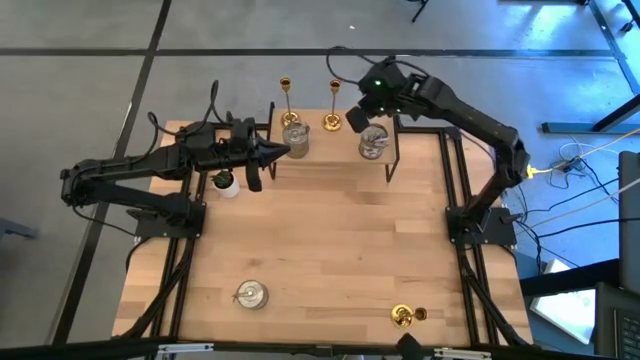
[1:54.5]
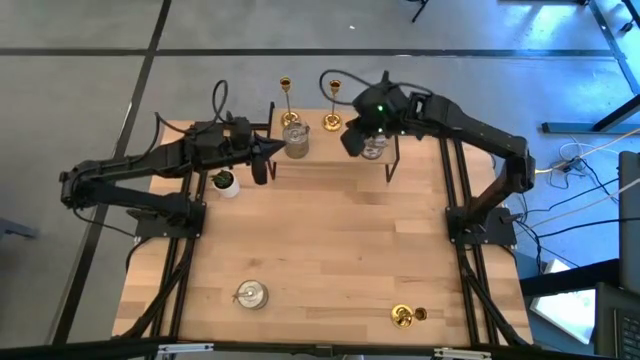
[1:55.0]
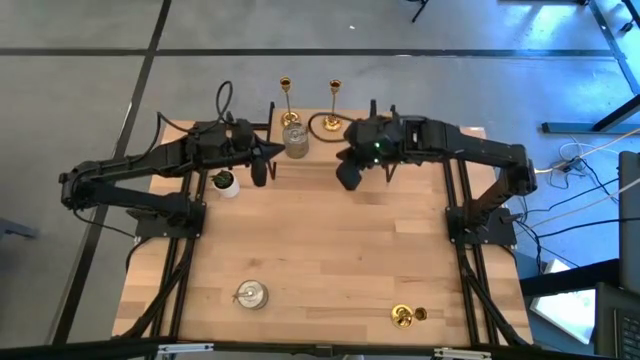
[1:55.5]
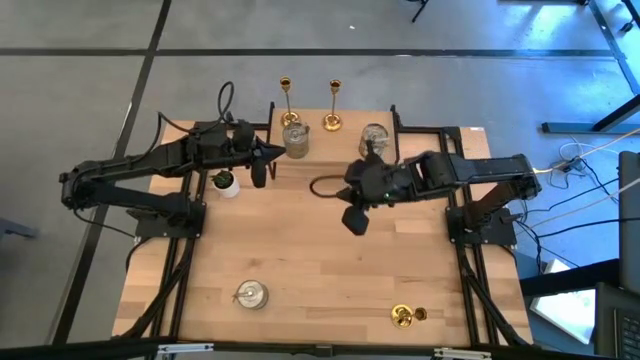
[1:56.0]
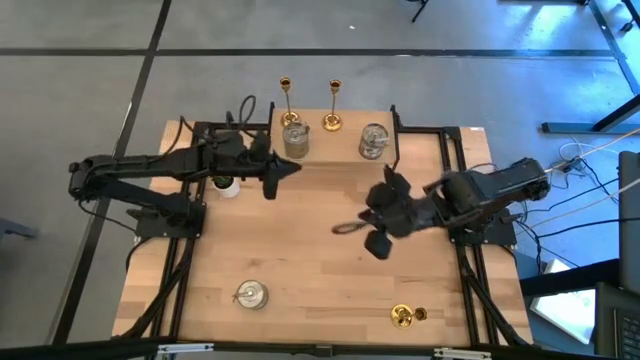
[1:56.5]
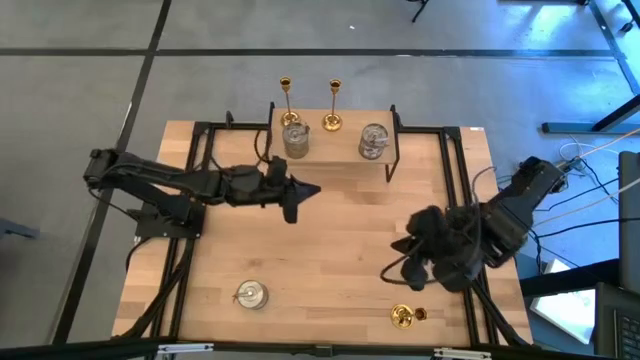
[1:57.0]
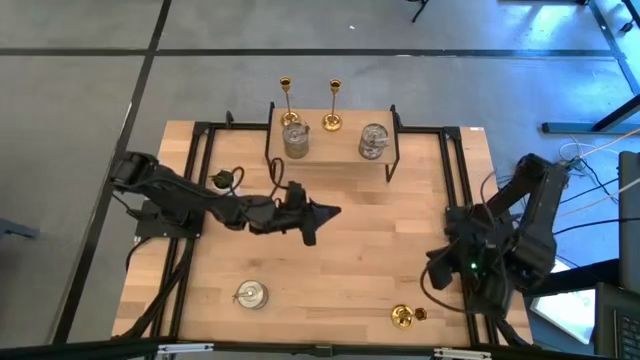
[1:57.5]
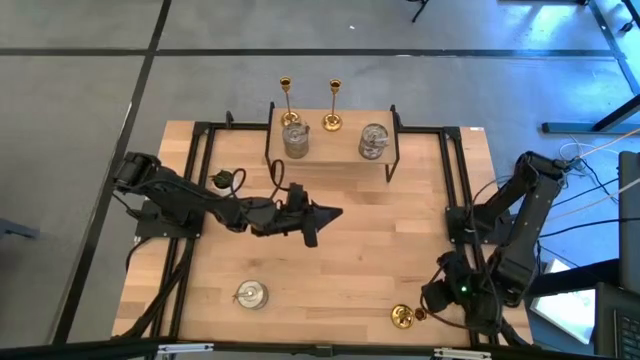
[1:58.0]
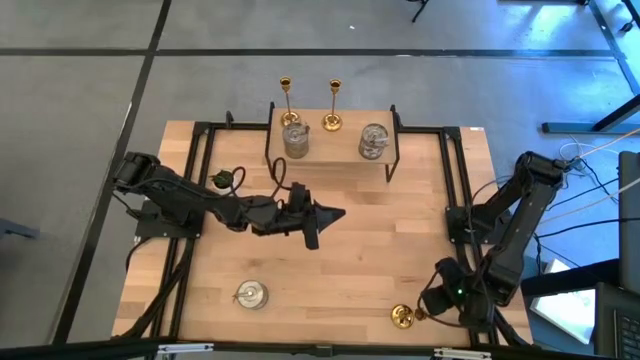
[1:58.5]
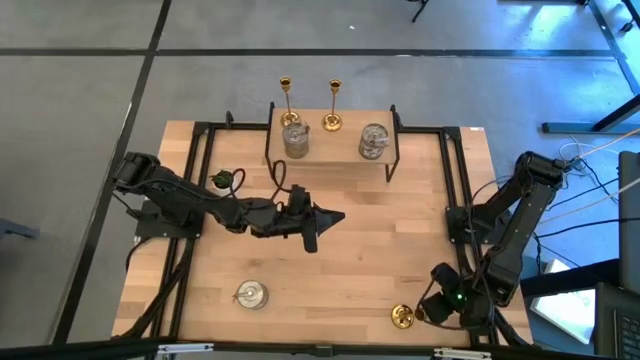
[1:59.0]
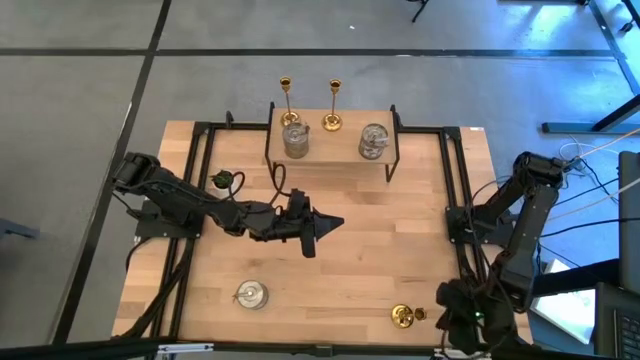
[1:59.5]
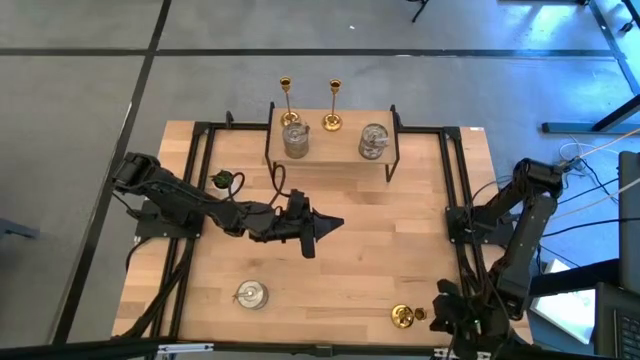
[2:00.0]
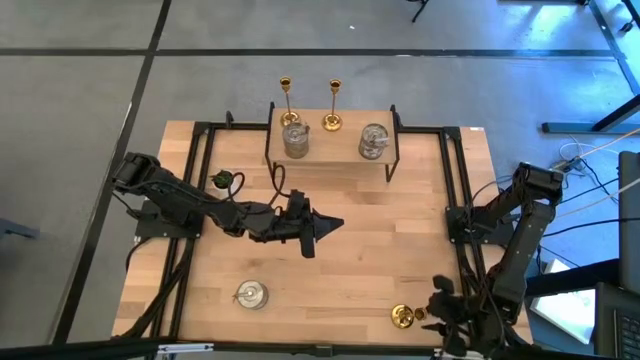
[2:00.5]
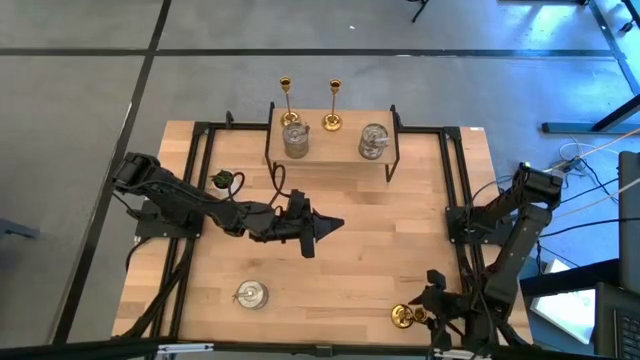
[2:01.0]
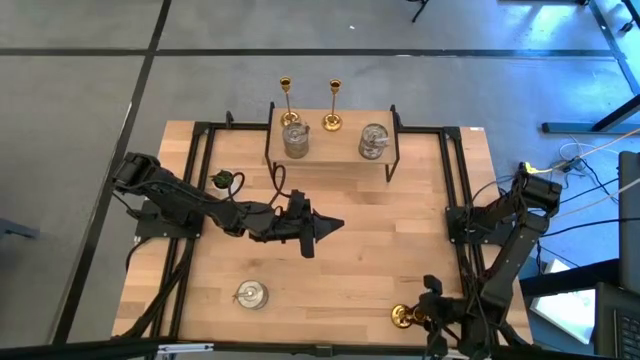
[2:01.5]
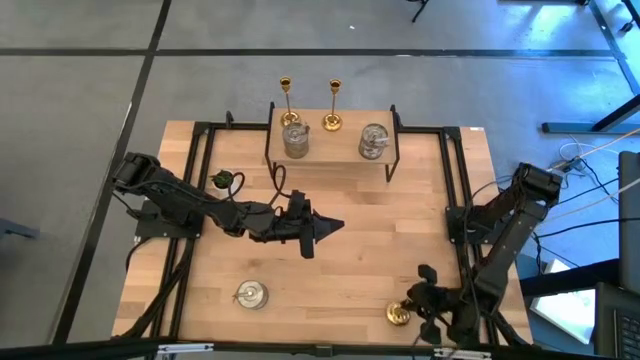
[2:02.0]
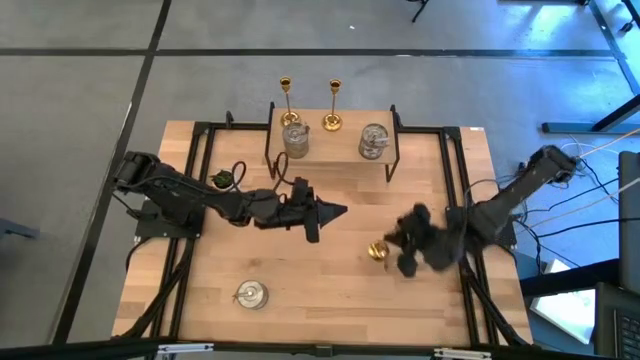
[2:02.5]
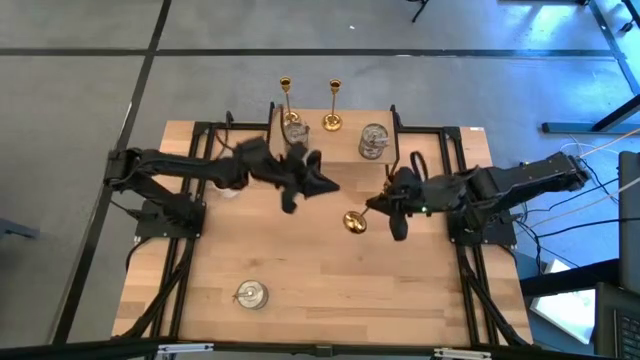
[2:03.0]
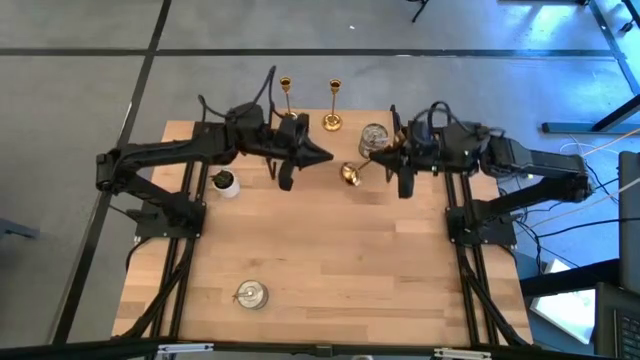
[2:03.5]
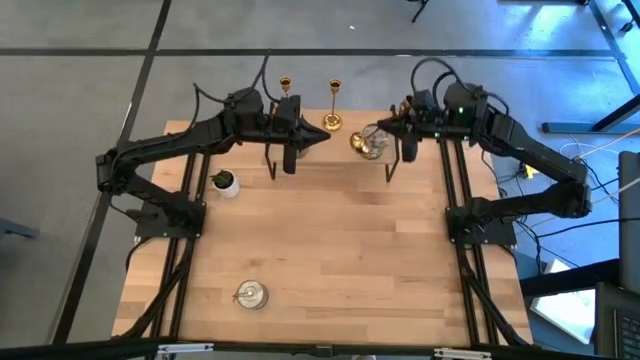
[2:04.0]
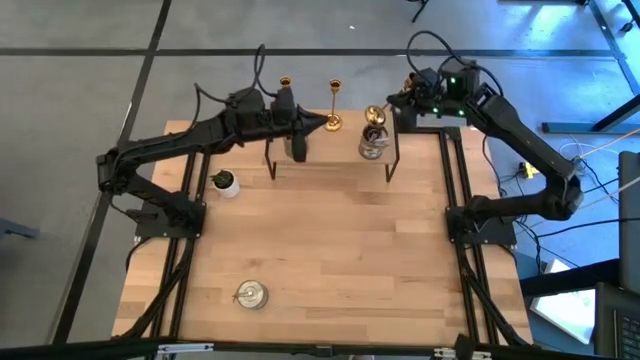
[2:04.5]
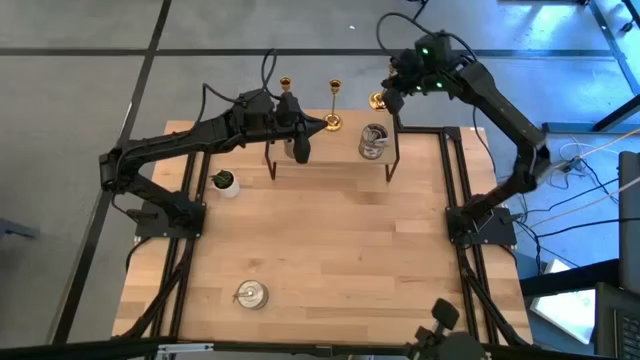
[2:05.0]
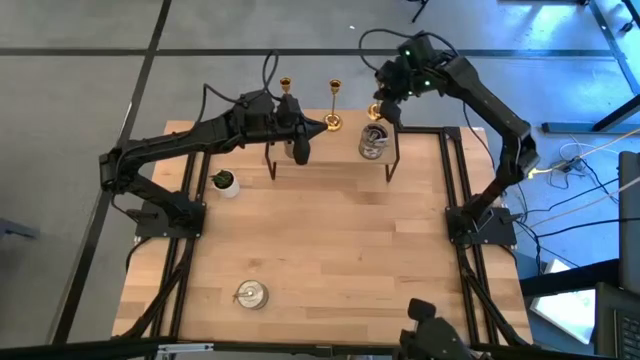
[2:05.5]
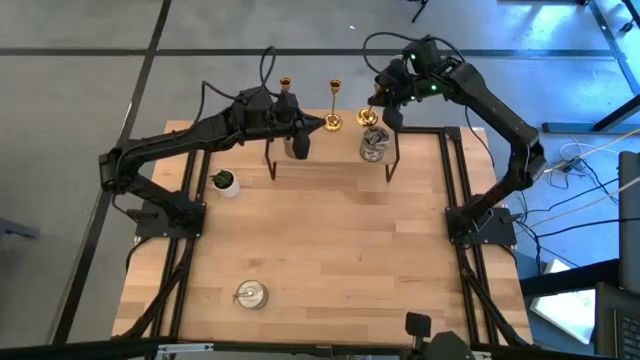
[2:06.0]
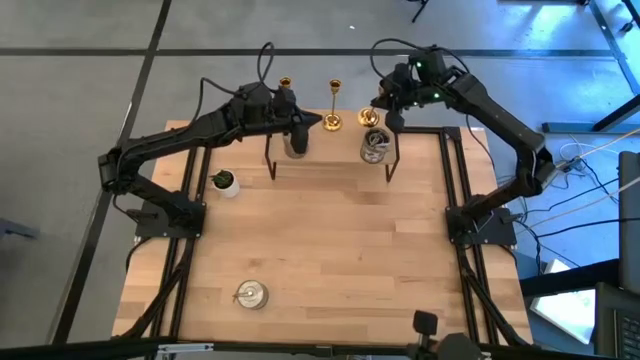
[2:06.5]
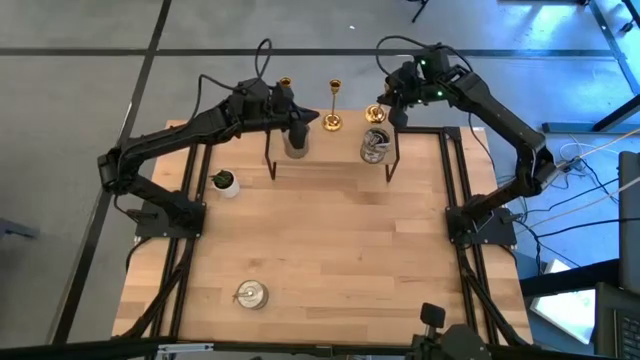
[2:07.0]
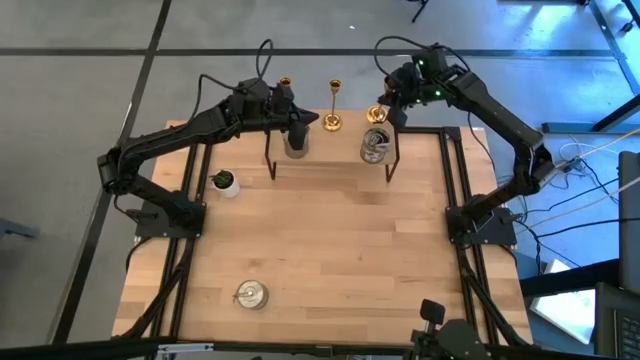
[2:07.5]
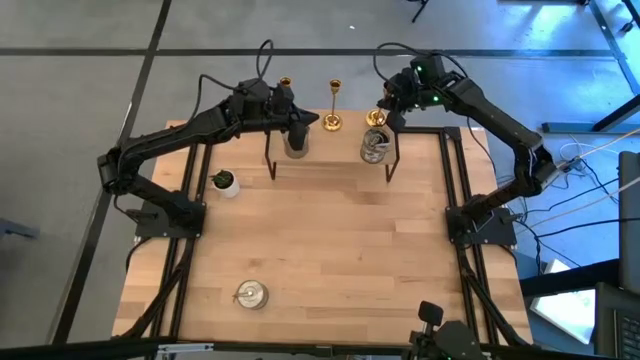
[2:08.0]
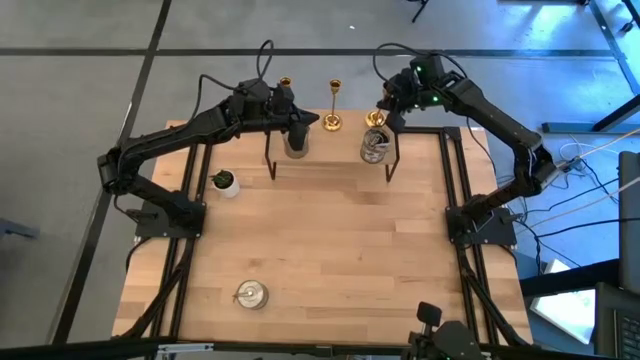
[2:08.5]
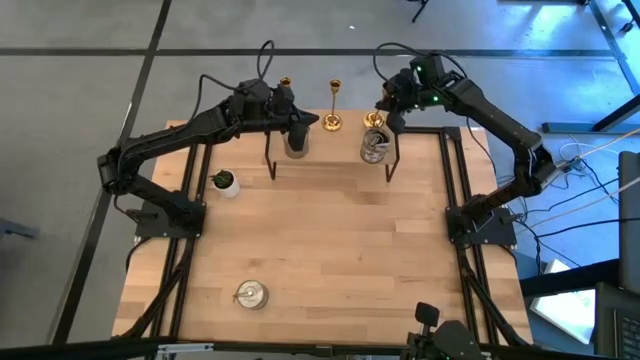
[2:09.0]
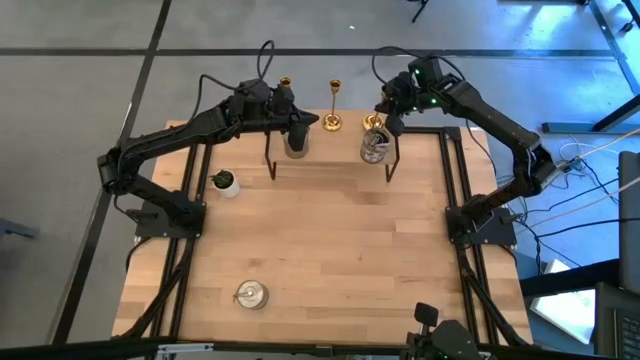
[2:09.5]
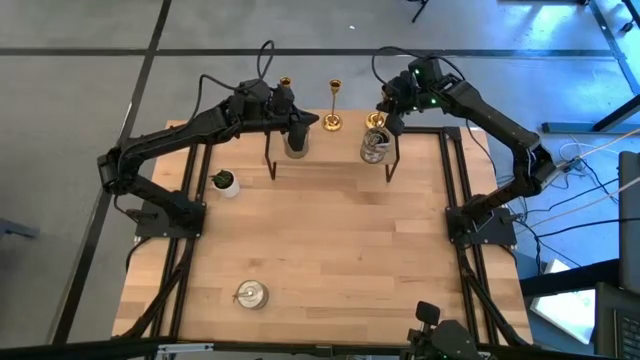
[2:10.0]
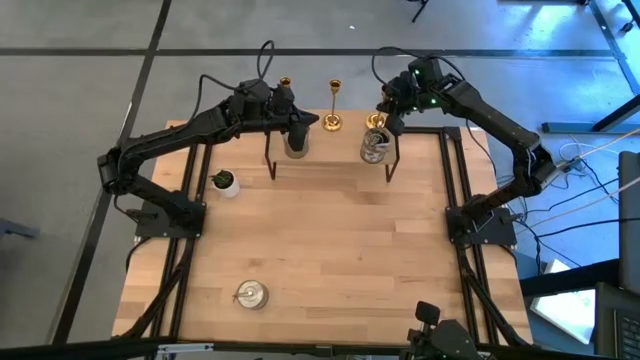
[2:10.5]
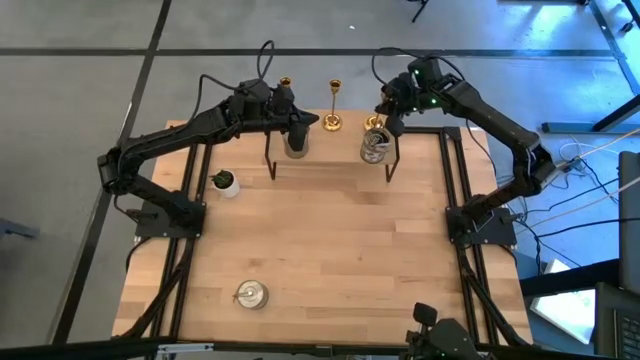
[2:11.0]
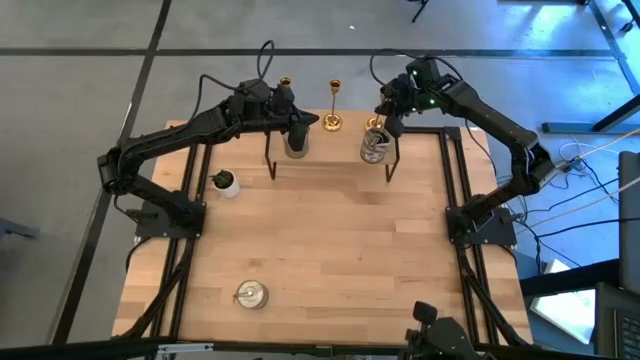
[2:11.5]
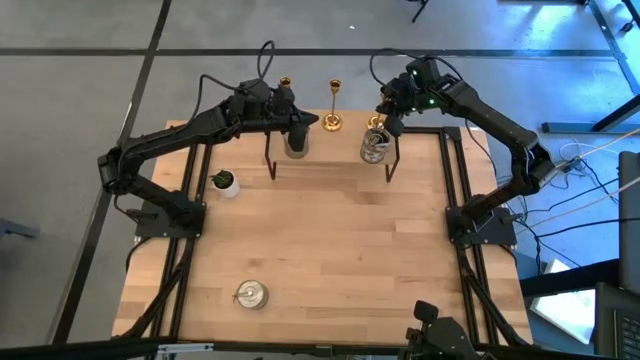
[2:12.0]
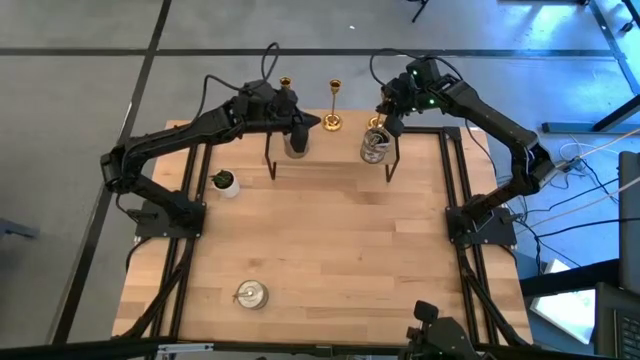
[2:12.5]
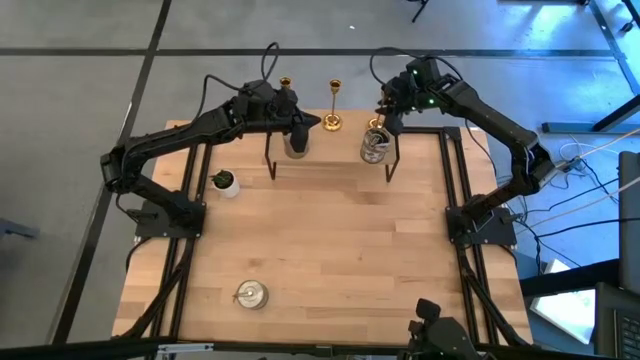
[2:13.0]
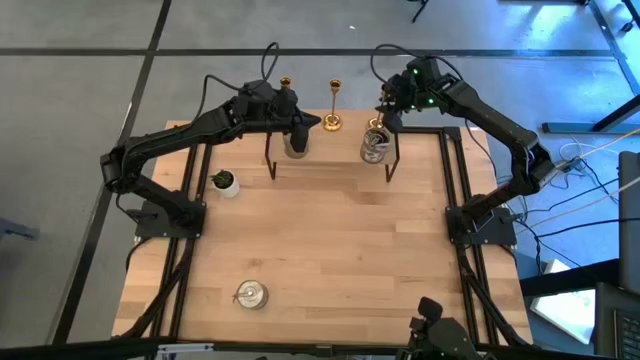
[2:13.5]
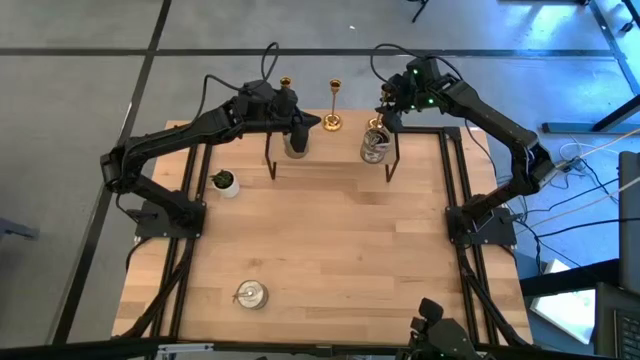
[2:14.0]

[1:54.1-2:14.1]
Task: Pick & Place candle stick holders
Put the gold candle holder on the shelf aligned with the other gold candle holders

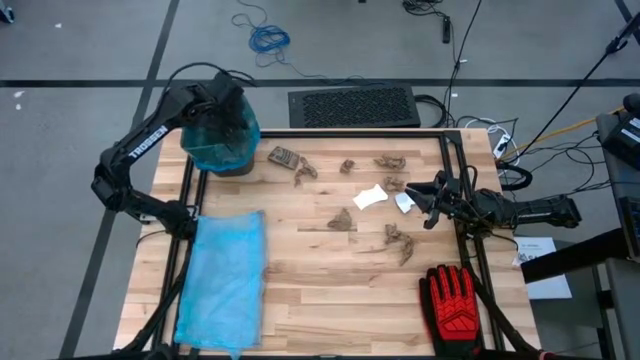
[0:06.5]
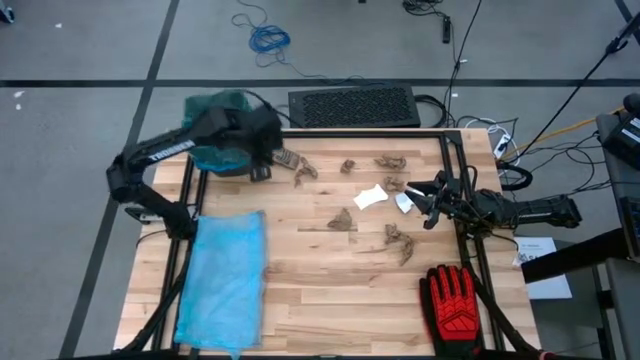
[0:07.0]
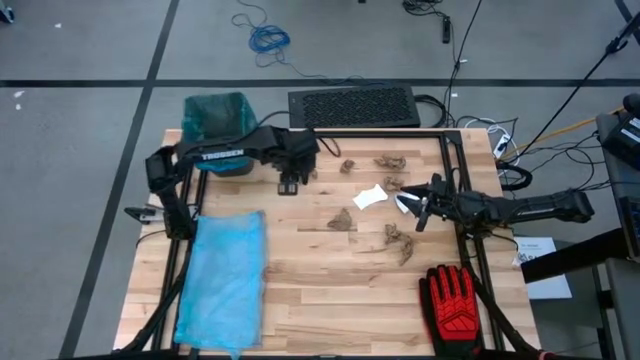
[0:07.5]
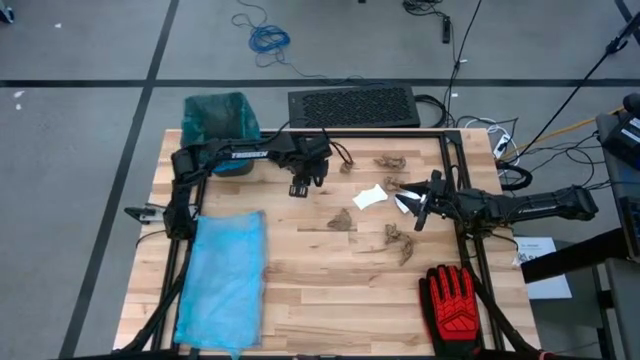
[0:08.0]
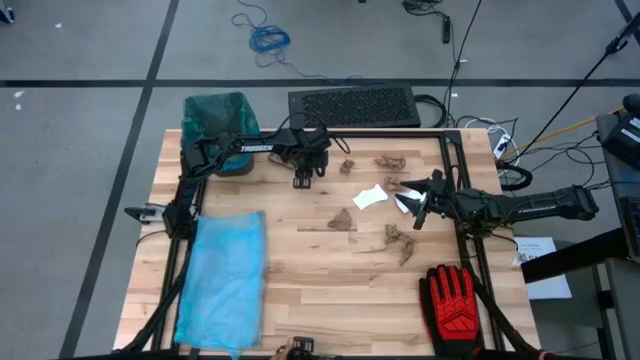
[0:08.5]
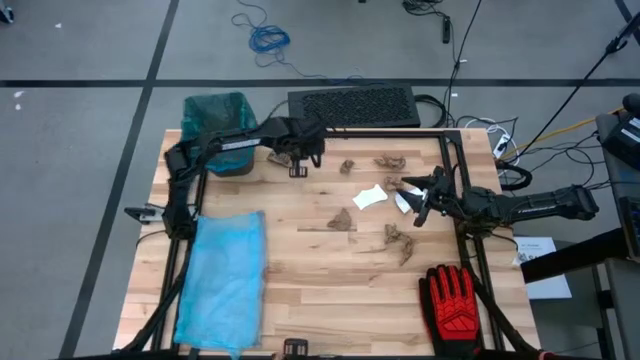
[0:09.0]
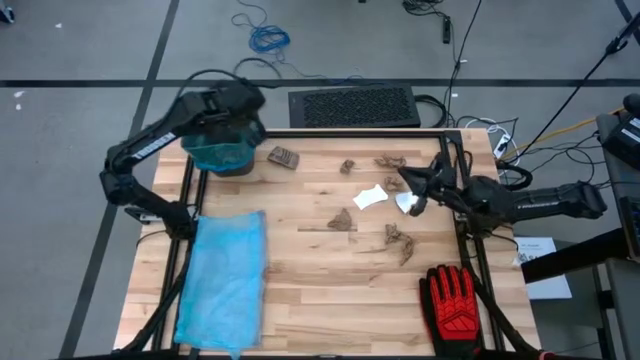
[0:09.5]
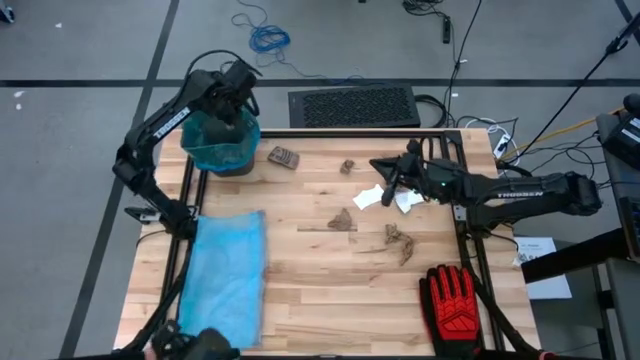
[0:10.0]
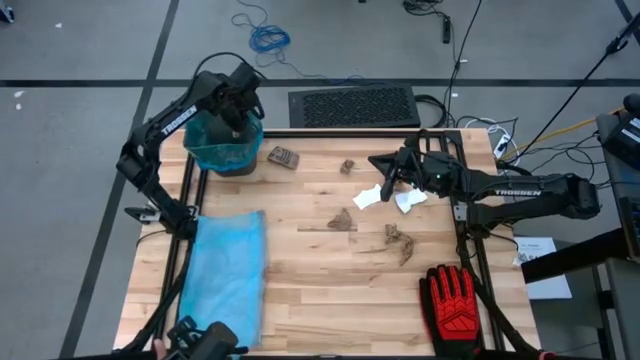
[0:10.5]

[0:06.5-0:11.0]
Task: place trash/remove bag and relplace
Put the brown napkin into the black trash bin
